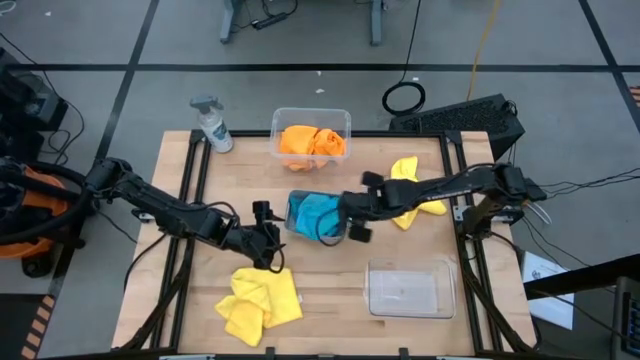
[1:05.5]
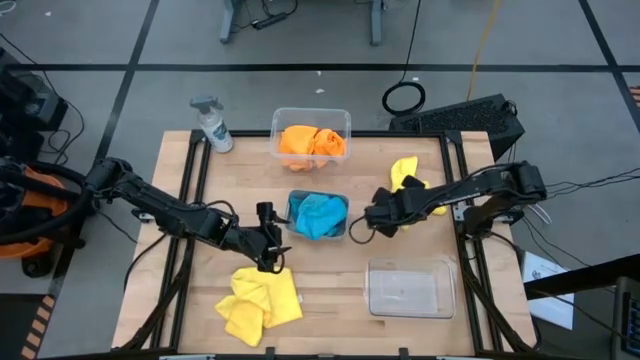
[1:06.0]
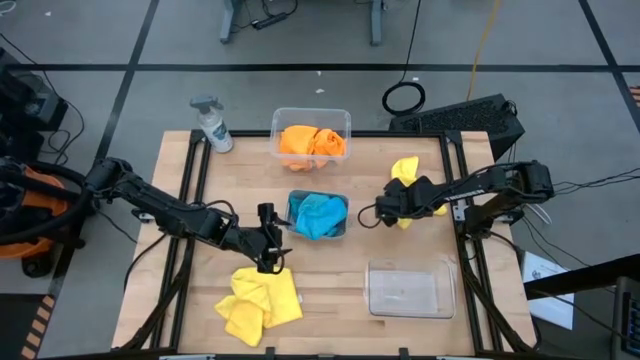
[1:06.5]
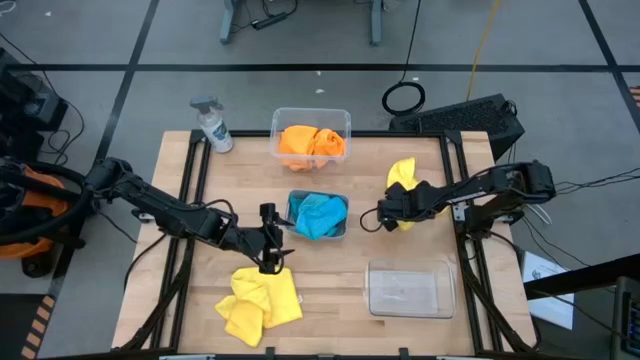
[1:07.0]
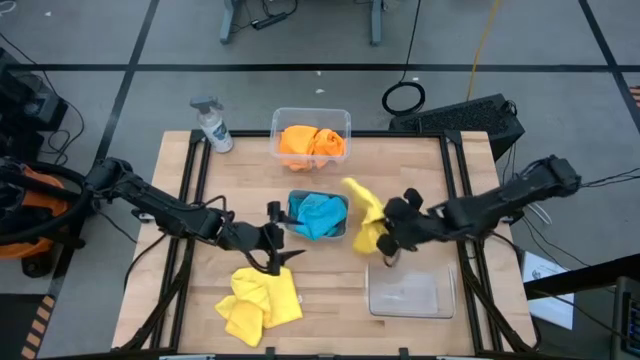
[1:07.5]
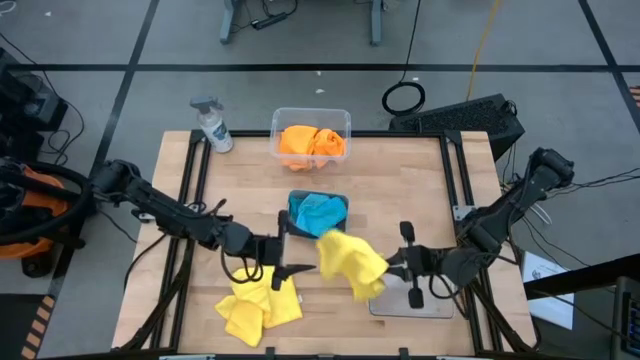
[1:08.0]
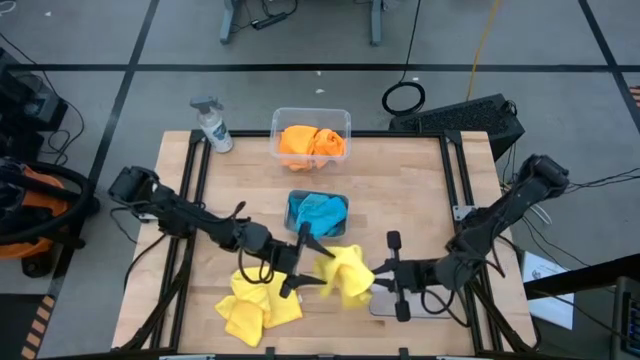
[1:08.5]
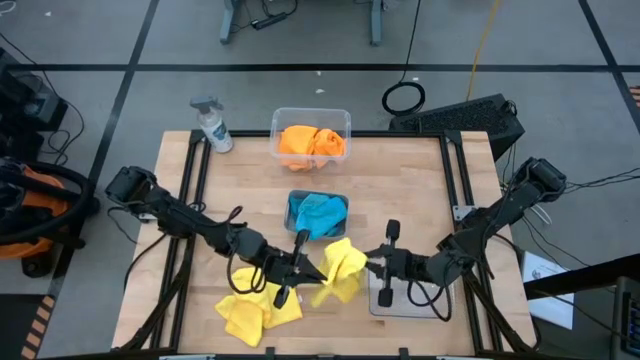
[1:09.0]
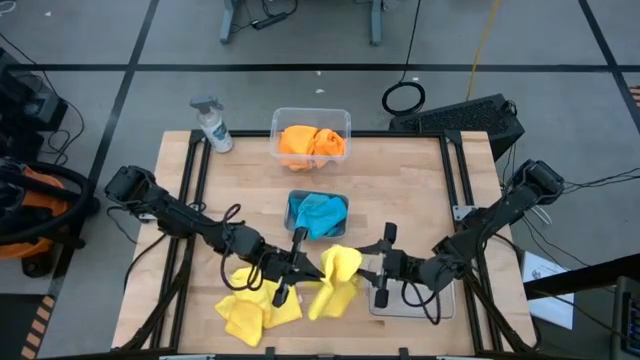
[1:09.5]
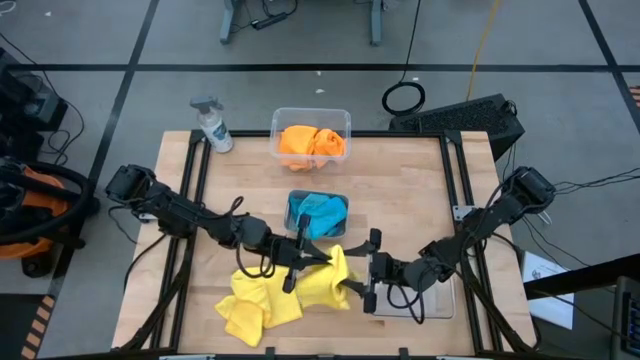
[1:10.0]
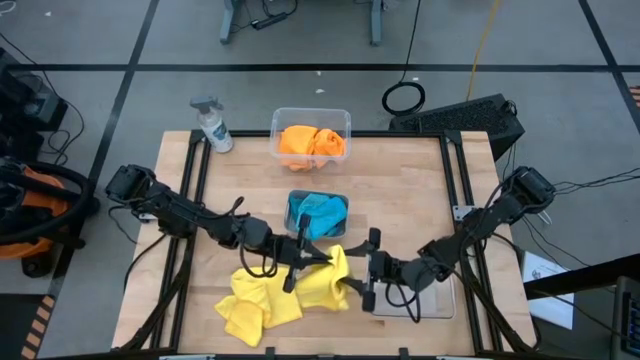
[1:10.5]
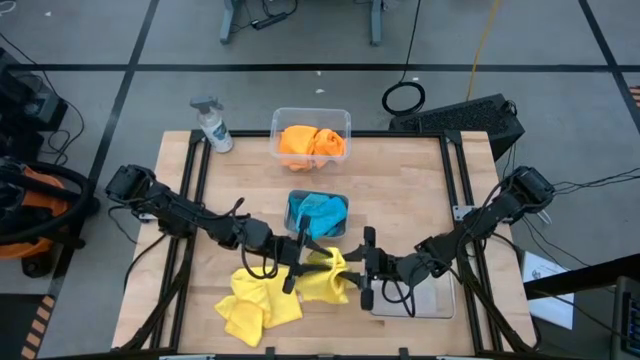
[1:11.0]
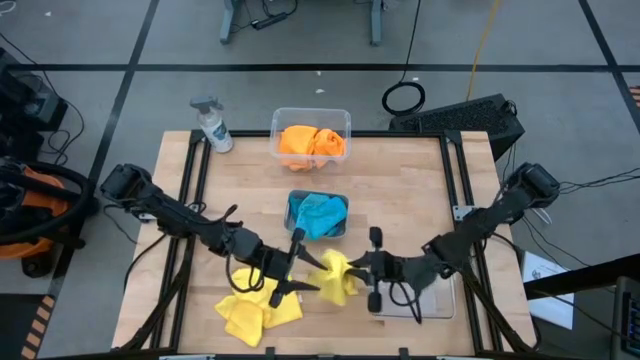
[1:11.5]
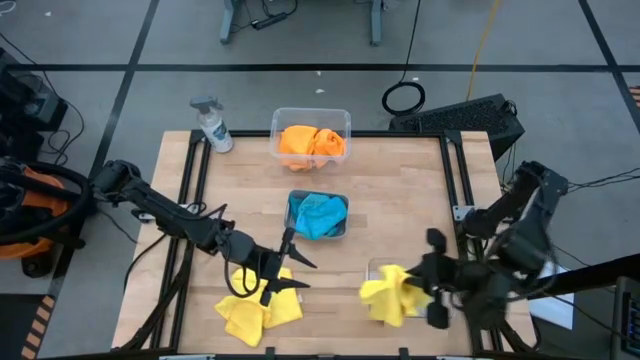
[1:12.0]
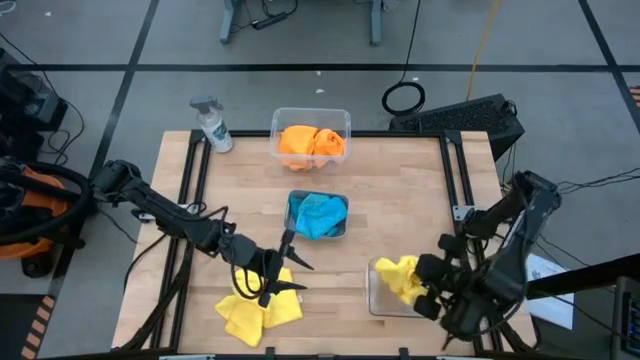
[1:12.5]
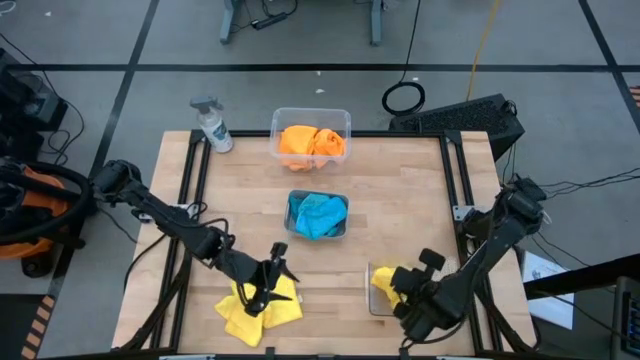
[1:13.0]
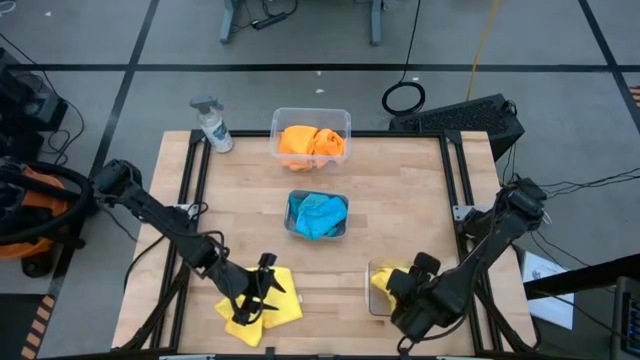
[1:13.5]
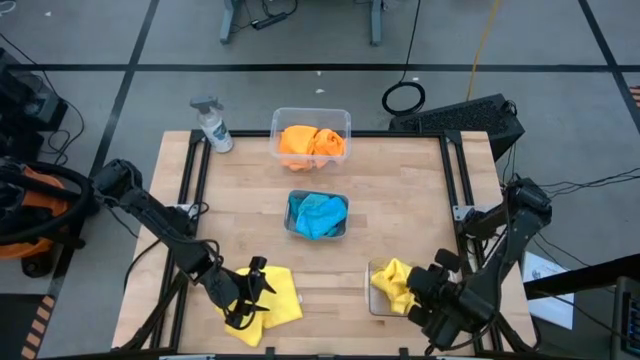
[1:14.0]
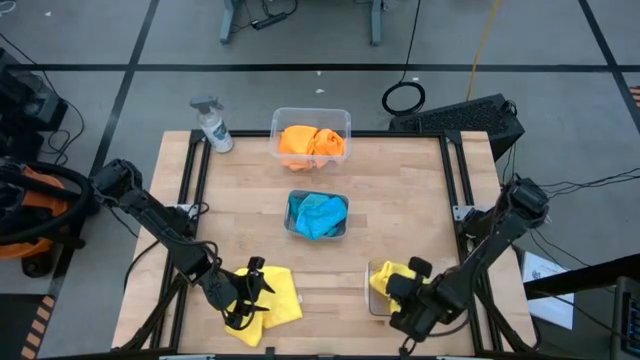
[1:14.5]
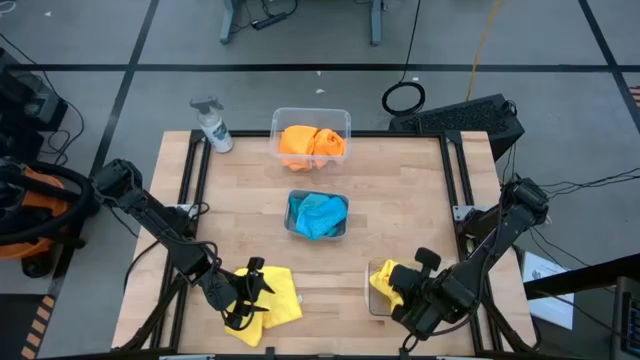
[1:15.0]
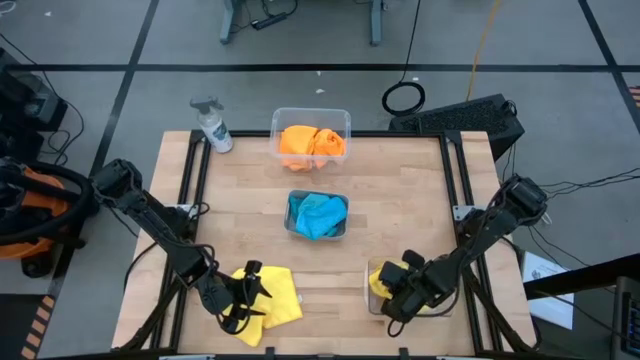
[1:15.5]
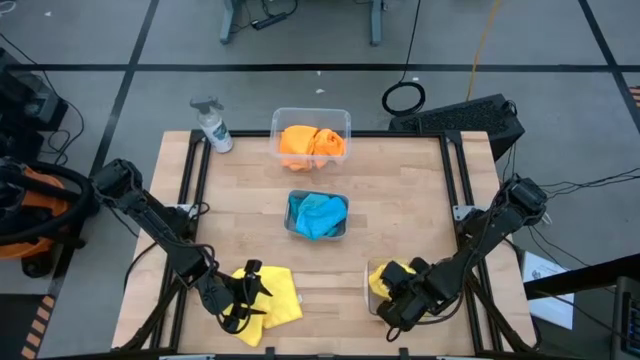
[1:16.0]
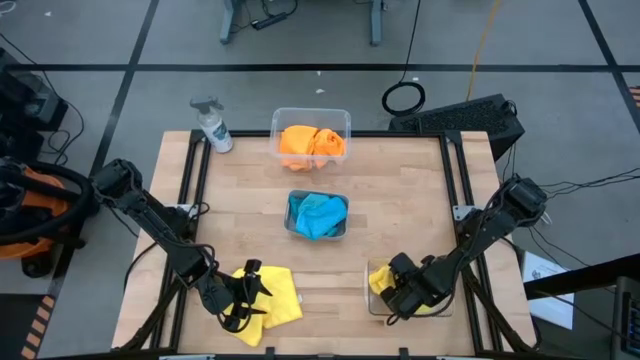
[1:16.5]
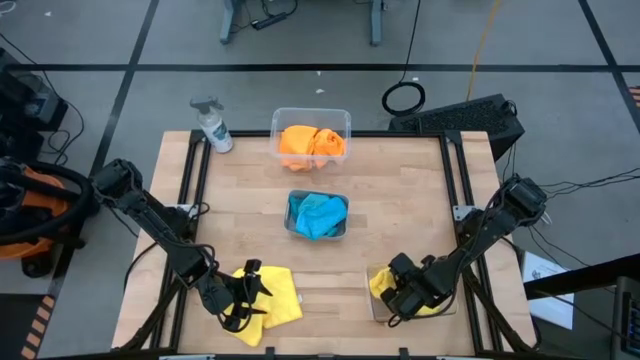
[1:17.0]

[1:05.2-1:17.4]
Task: Sort microfiber towel by color & place in baskets
Put the top yellow microfiber towel into the bottom transparent bin

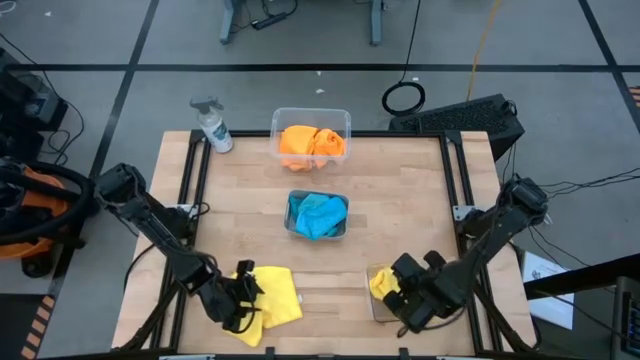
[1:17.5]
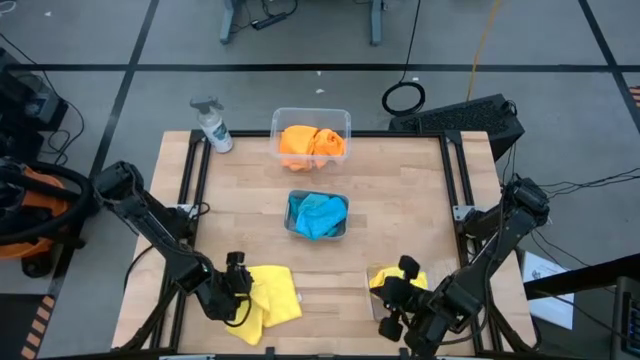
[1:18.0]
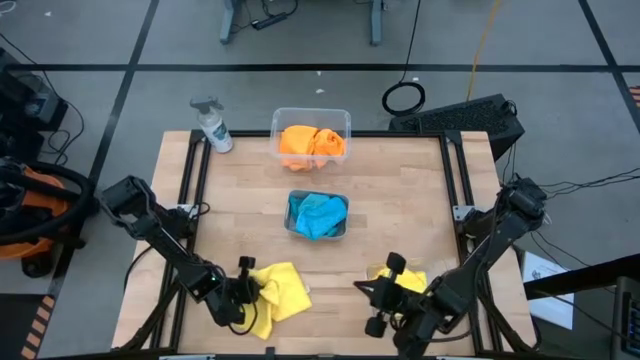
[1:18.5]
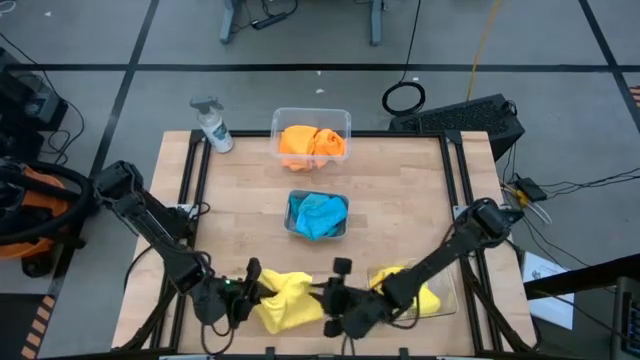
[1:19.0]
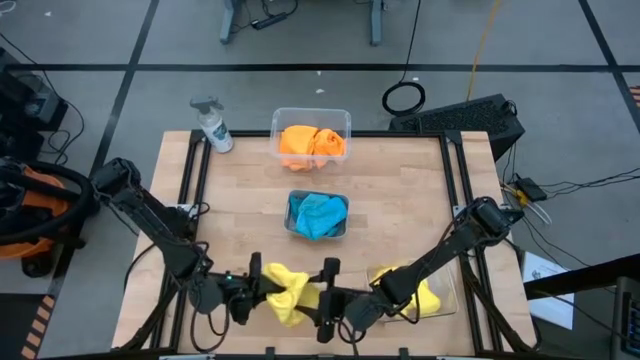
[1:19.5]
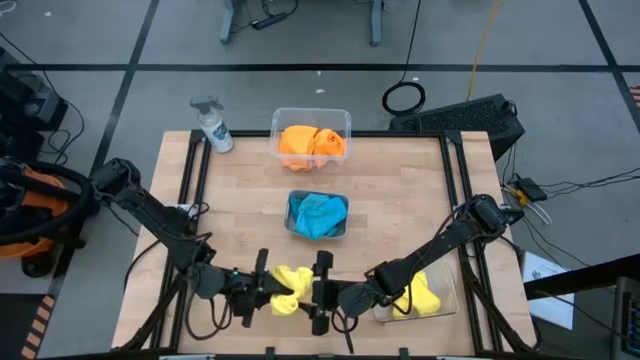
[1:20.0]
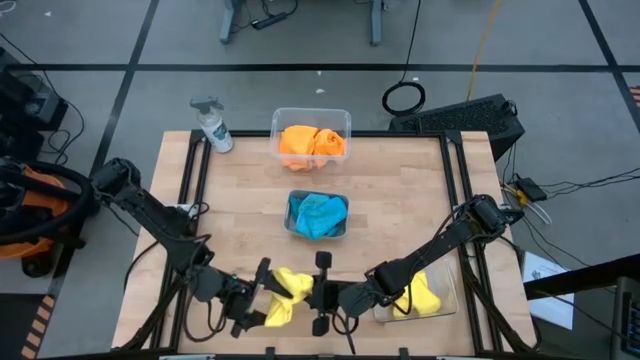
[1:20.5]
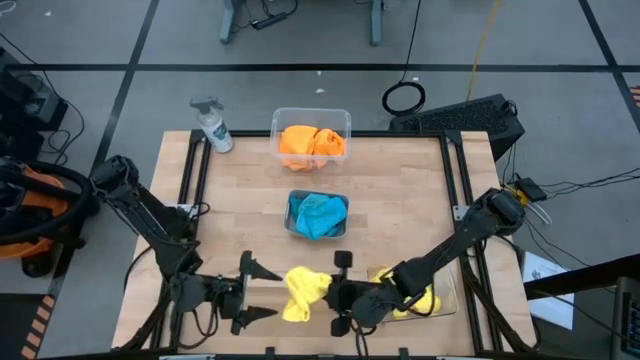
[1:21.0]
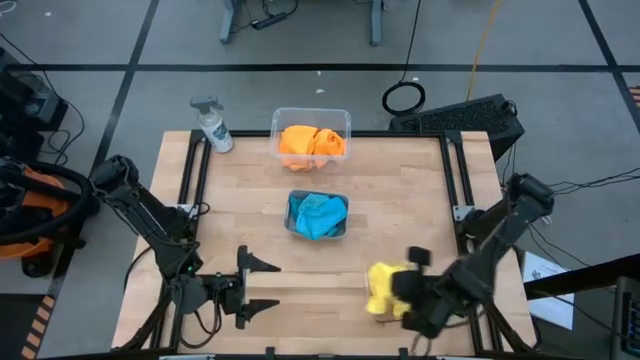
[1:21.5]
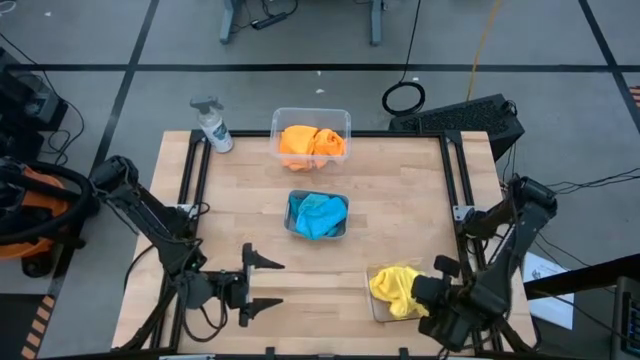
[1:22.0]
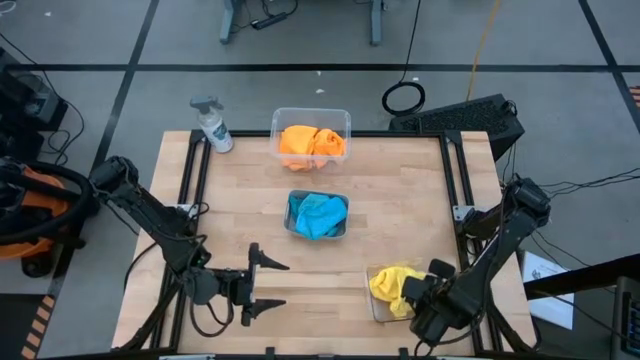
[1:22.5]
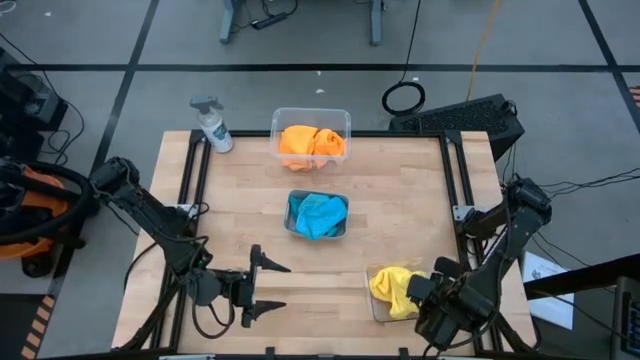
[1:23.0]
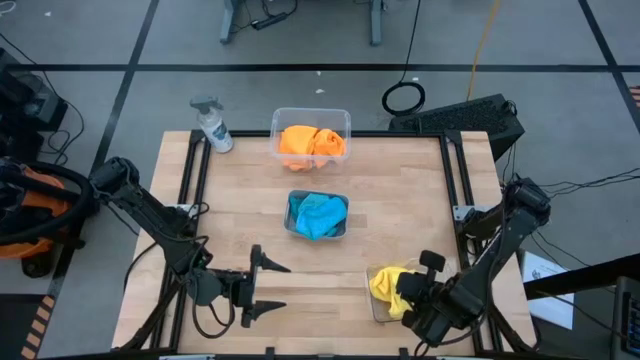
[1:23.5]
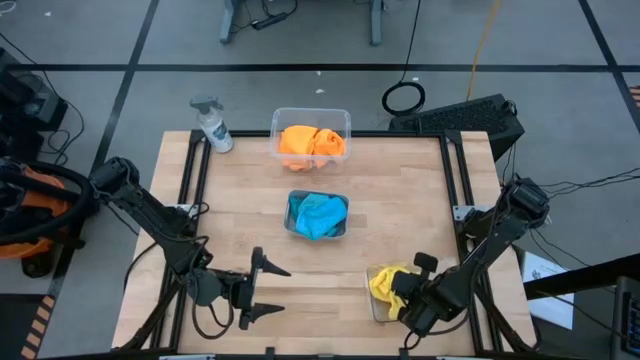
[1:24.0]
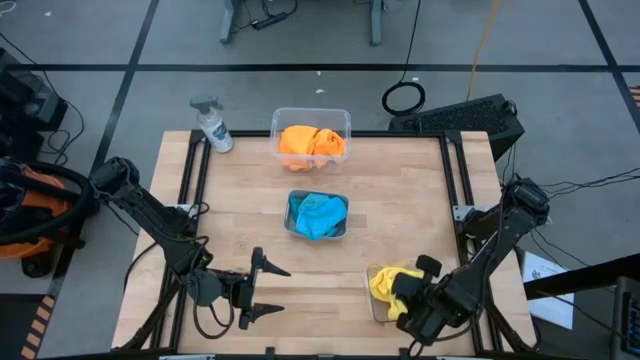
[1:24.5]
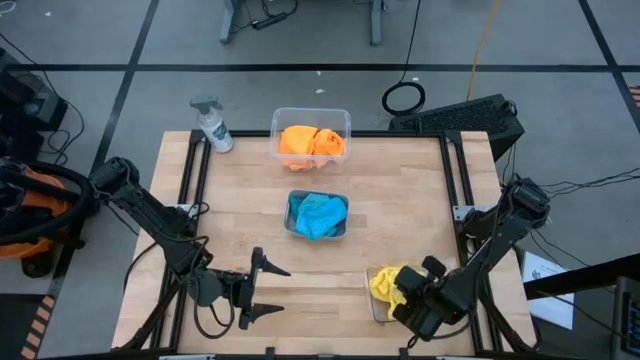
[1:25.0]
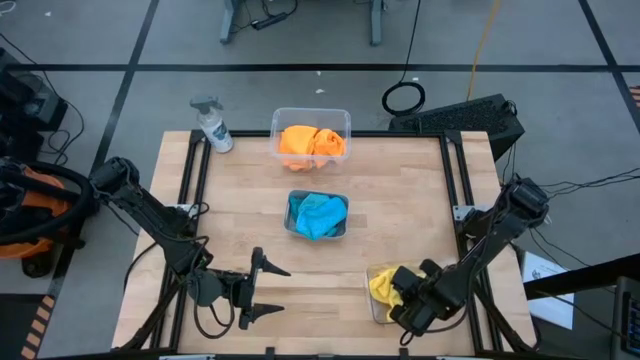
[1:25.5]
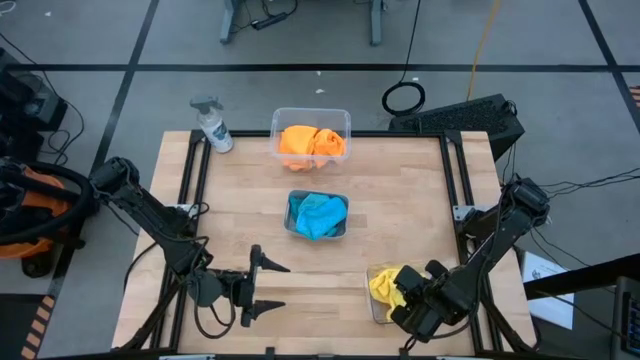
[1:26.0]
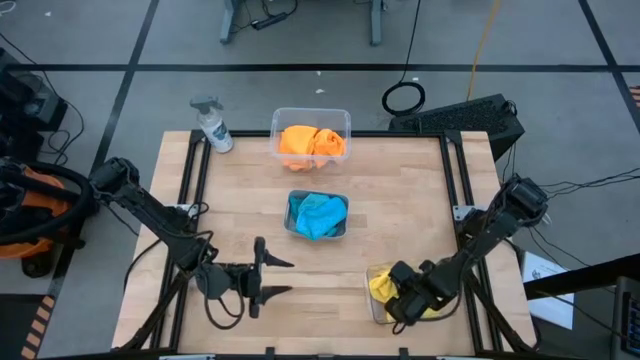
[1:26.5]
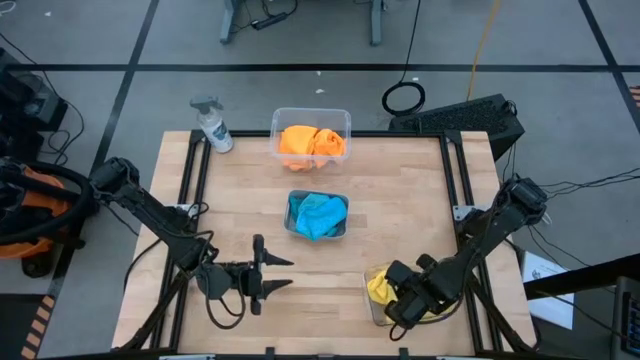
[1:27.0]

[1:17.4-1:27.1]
Put the yellow microfiber towel into the bottom transparent bin

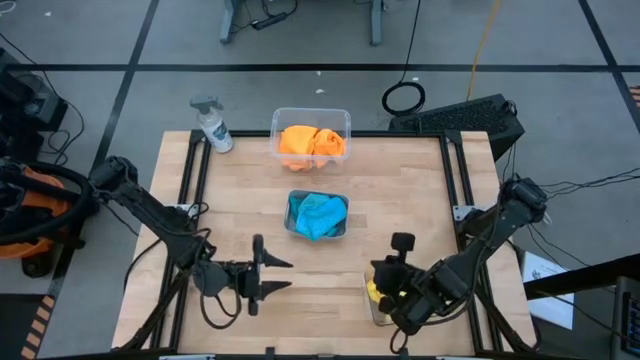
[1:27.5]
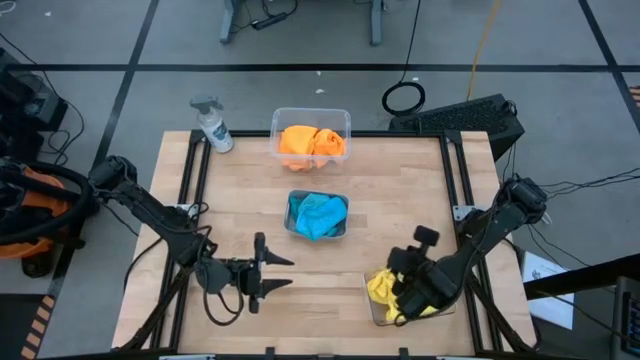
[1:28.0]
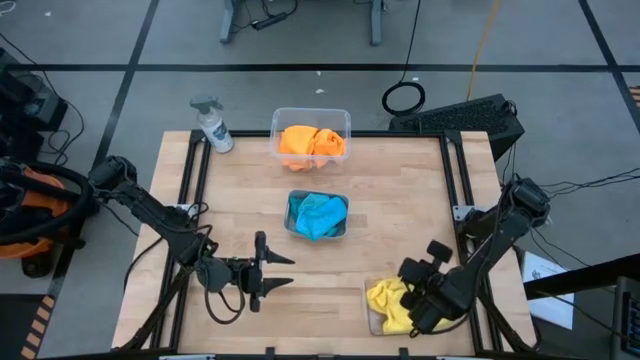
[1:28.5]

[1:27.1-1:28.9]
Adjust the bottom transparent bin
